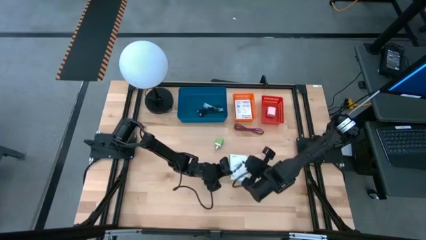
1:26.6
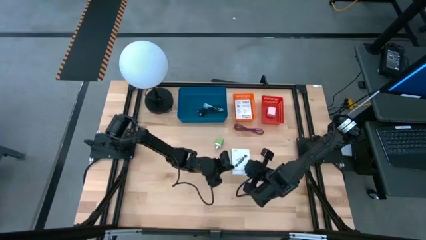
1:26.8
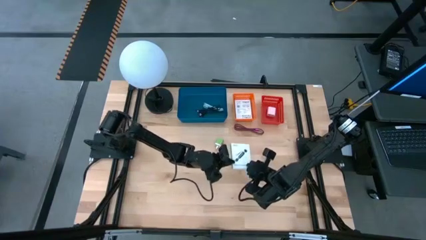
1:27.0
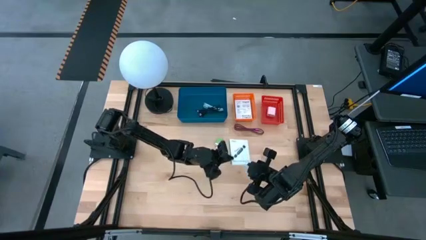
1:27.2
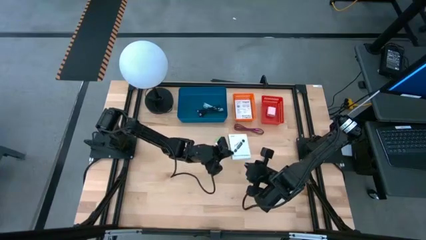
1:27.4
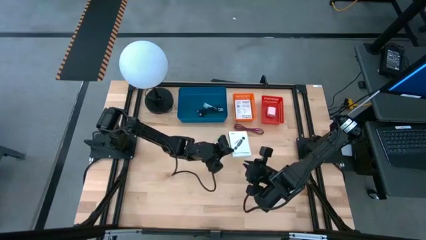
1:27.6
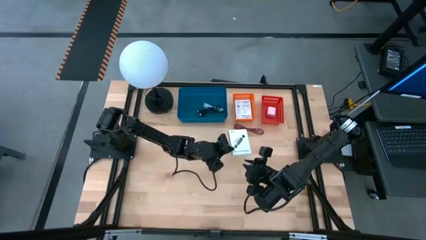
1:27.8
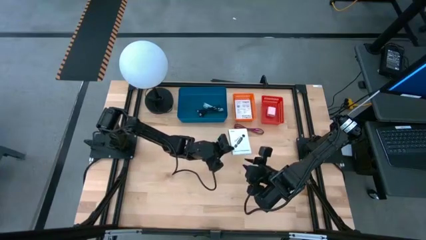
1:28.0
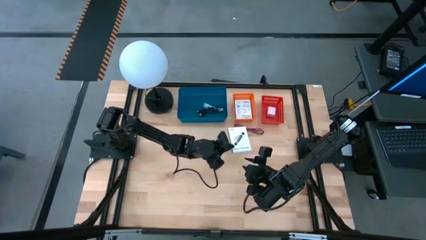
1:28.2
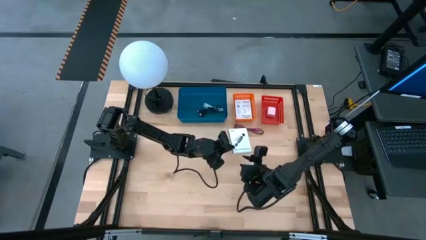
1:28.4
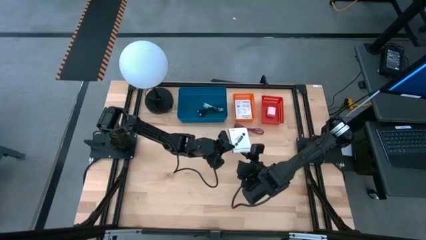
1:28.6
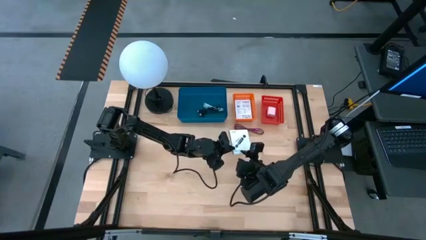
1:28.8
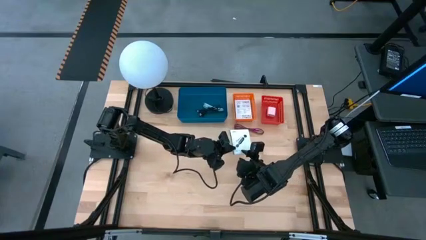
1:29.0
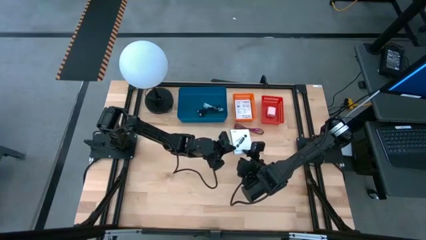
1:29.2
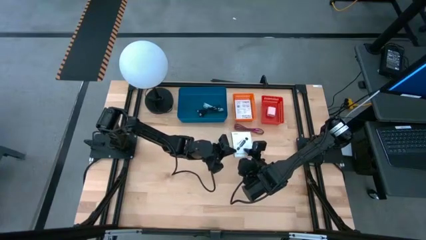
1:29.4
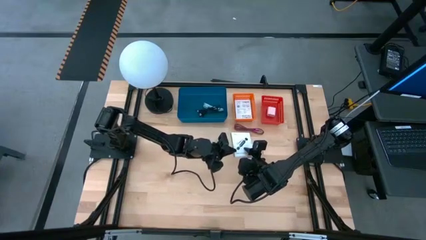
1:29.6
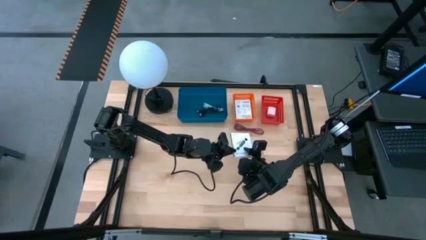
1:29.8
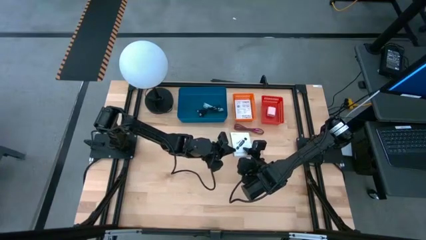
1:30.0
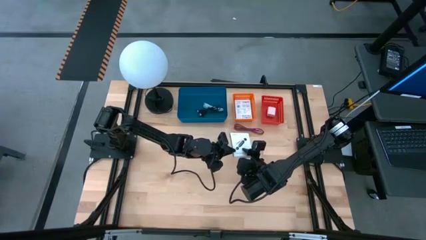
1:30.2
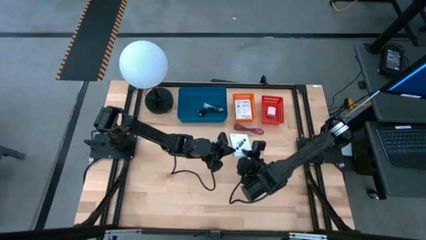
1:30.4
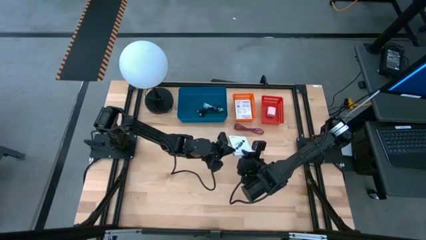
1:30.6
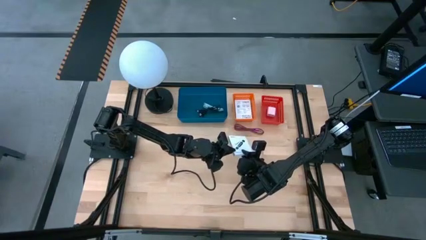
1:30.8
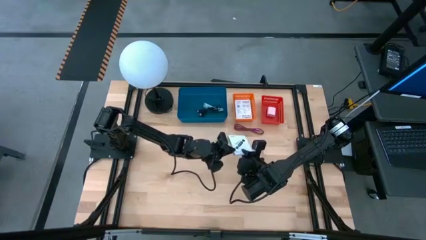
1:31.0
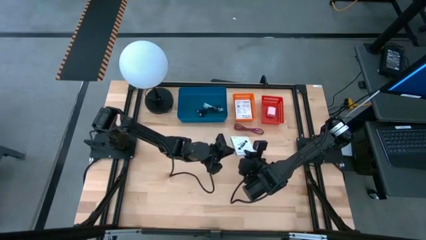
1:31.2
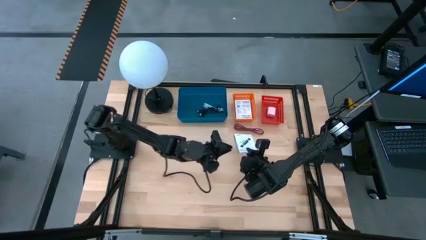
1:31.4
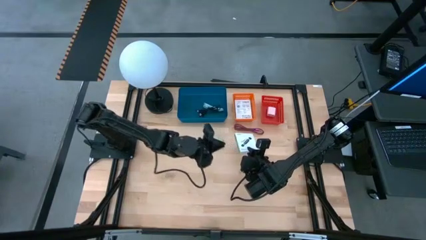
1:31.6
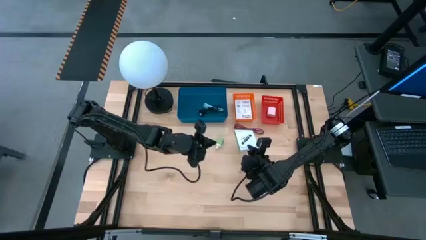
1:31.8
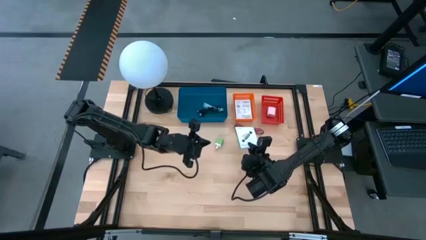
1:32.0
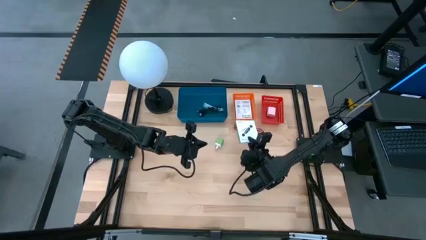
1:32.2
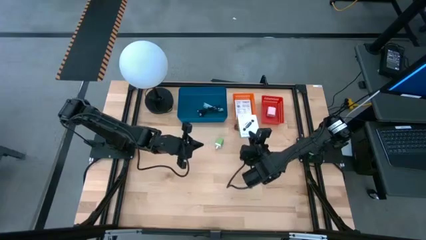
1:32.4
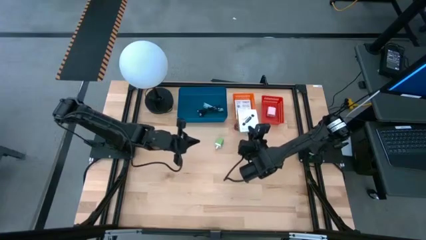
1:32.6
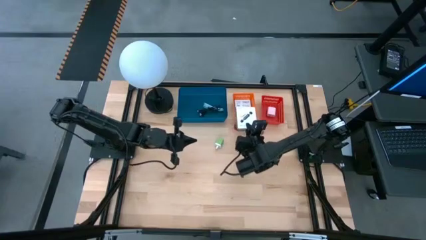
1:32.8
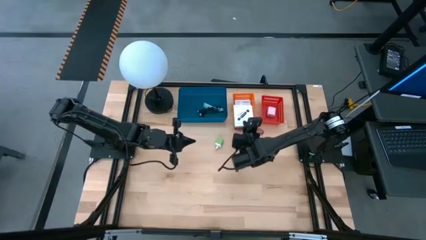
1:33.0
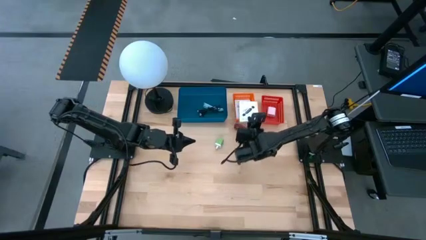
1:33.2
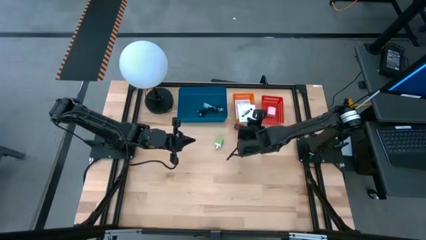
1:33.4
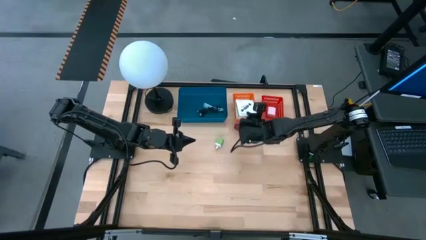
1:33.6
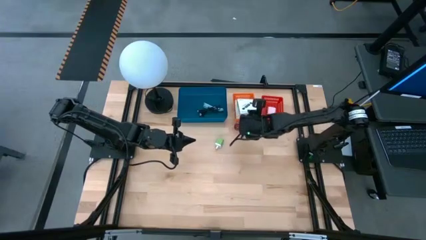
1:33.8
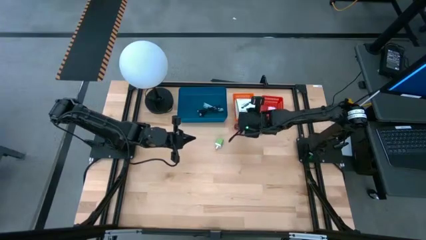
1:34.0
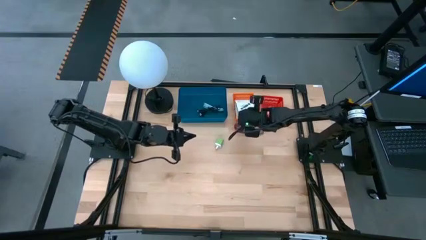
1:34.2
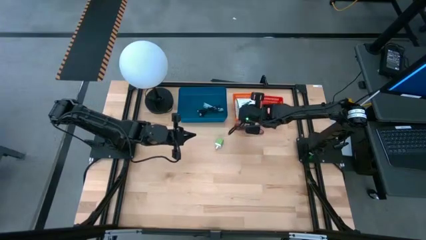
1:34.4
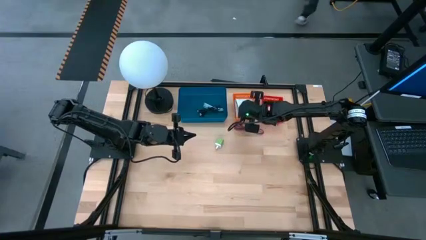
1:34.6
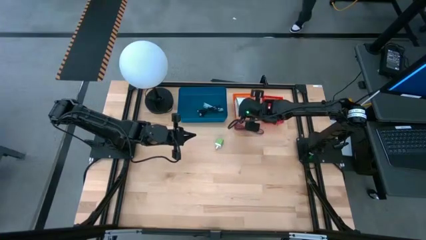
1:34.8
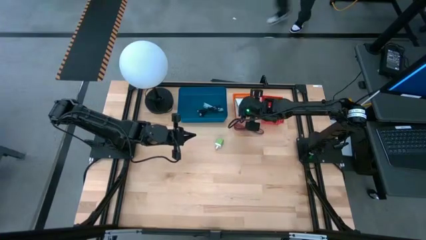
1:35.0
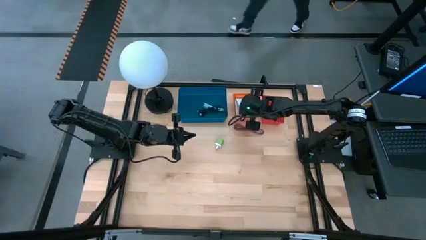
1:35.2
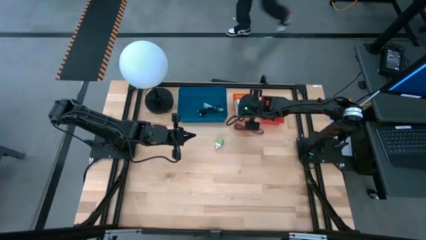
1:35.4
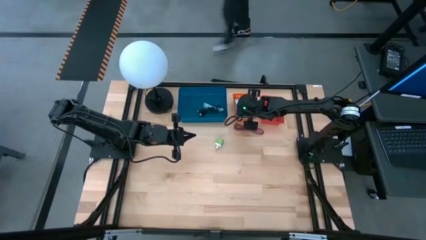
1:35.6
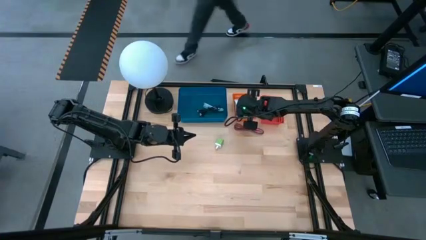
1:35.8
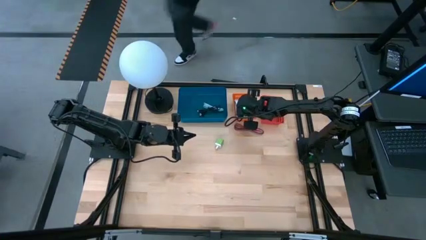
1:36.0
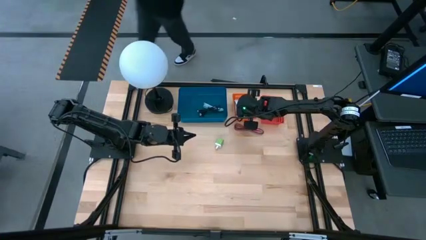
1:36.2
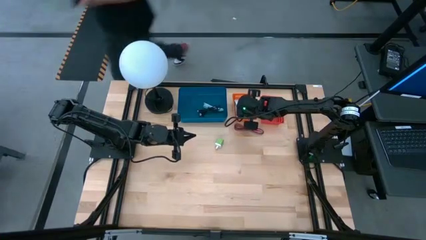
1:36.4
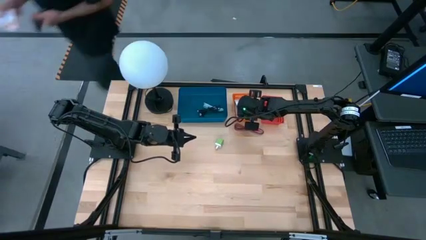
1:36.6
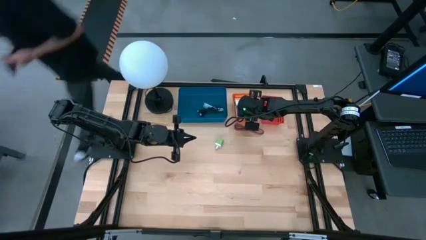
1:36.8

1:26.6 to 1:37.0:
Task: Pick and place items into bin
Put the white card reader box into the orange bin

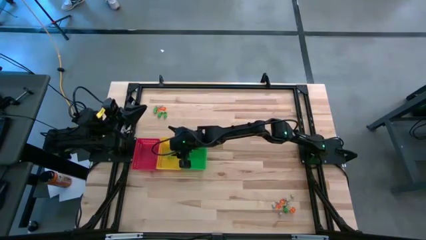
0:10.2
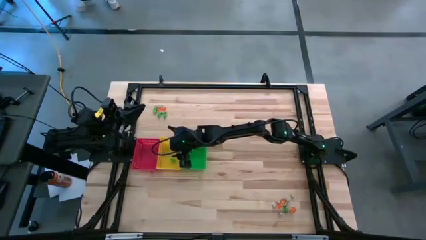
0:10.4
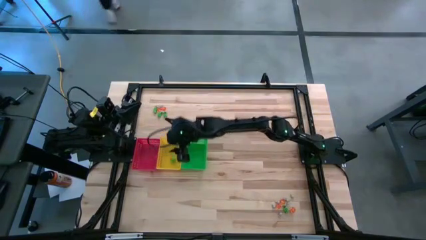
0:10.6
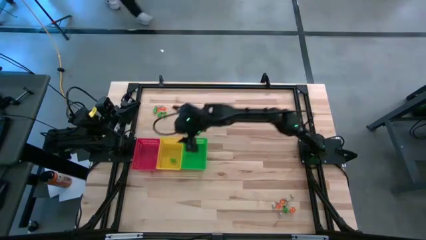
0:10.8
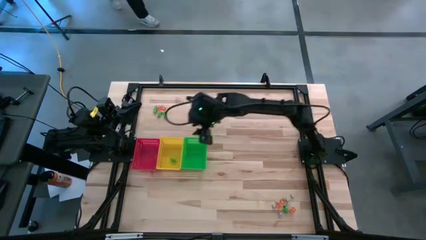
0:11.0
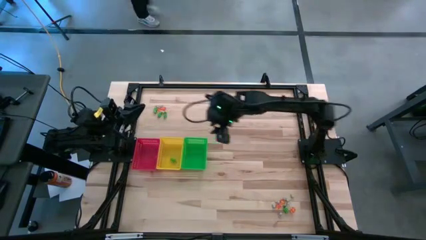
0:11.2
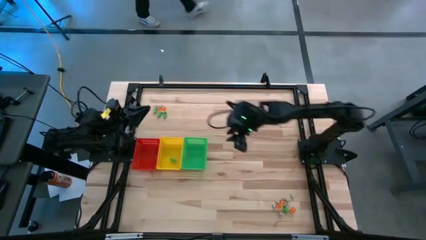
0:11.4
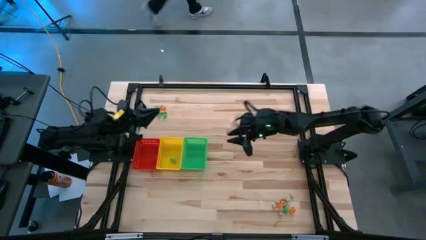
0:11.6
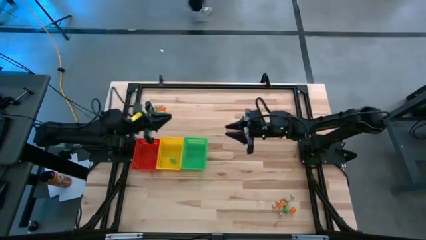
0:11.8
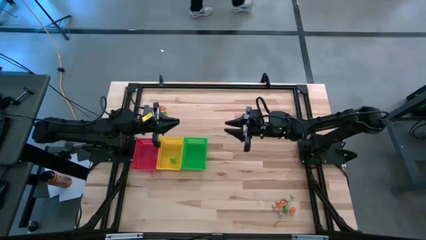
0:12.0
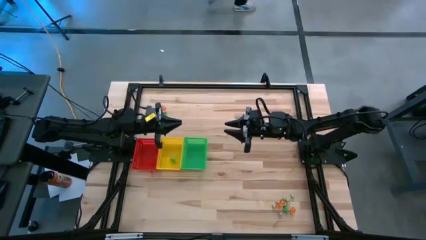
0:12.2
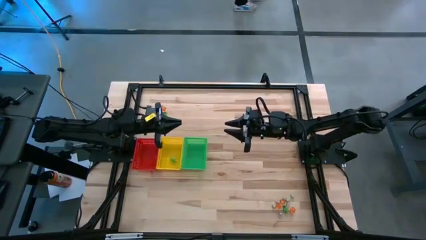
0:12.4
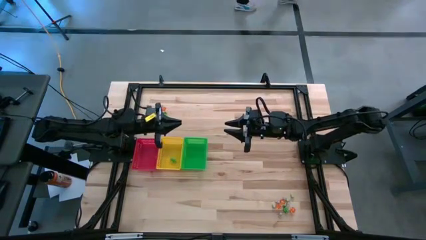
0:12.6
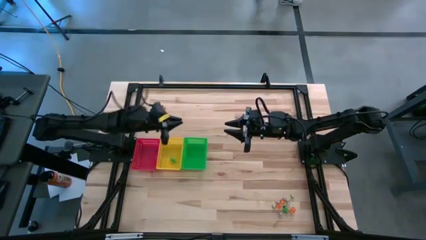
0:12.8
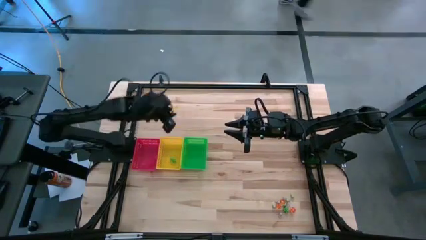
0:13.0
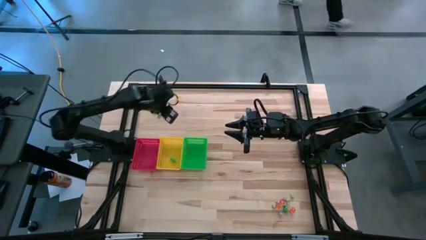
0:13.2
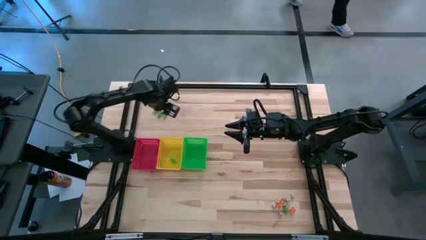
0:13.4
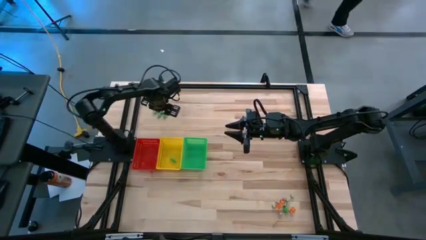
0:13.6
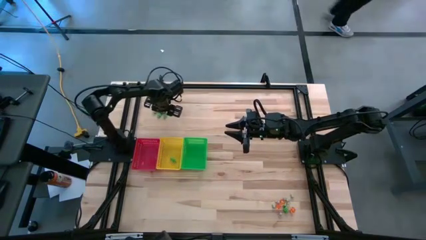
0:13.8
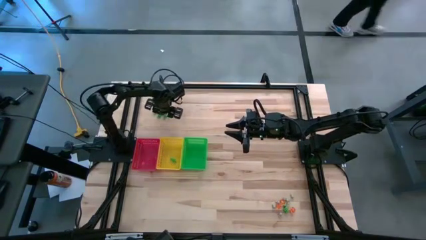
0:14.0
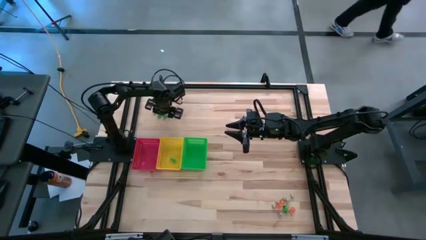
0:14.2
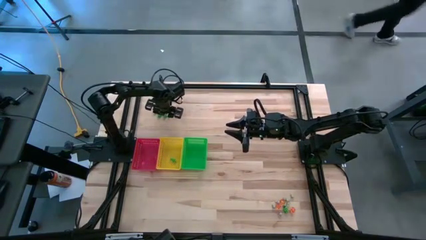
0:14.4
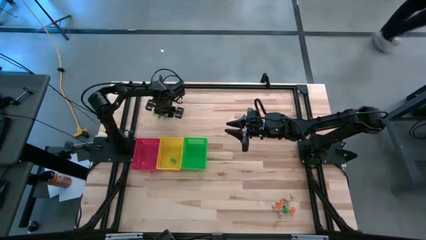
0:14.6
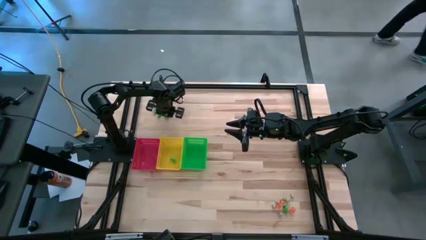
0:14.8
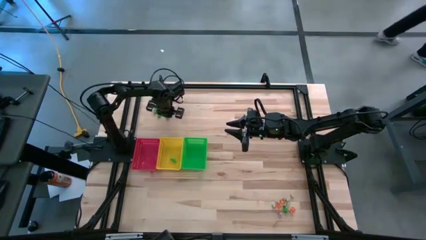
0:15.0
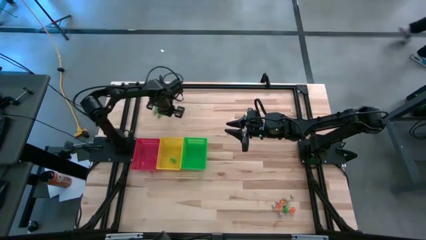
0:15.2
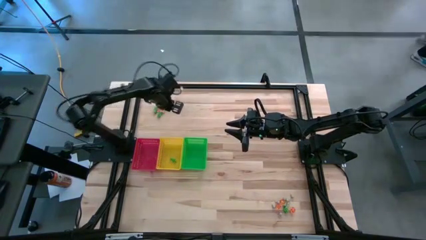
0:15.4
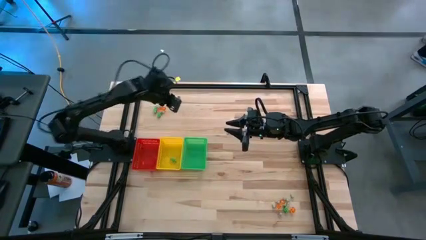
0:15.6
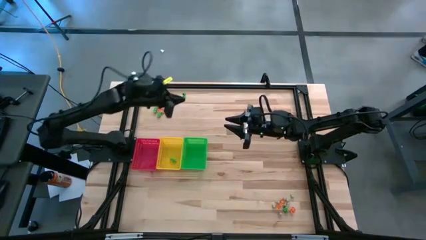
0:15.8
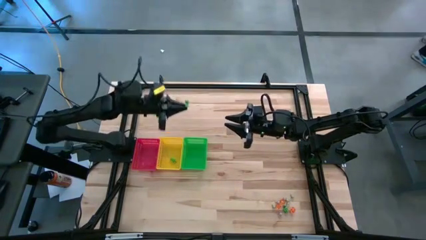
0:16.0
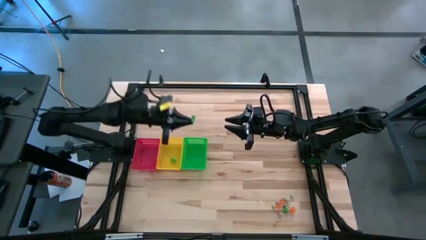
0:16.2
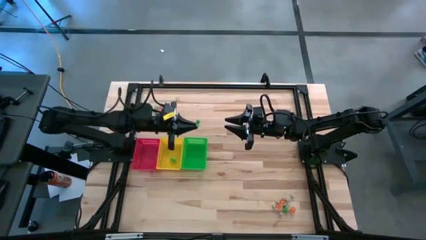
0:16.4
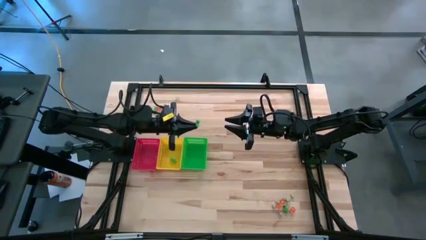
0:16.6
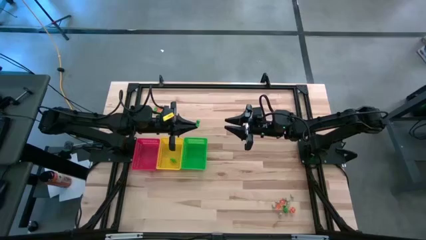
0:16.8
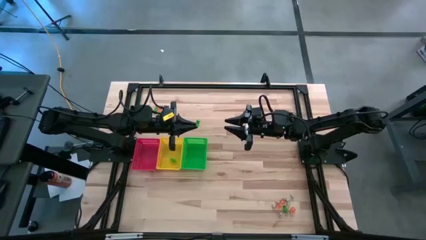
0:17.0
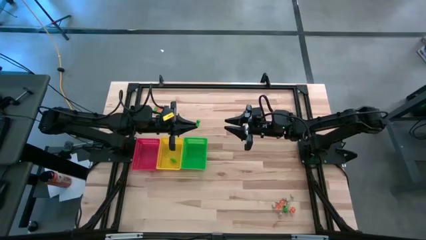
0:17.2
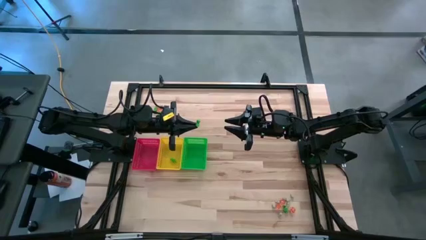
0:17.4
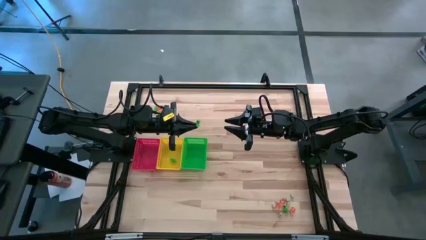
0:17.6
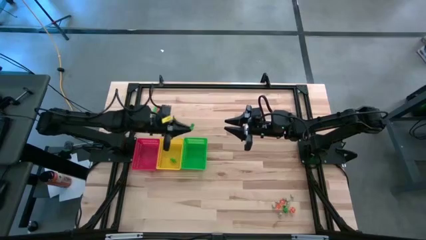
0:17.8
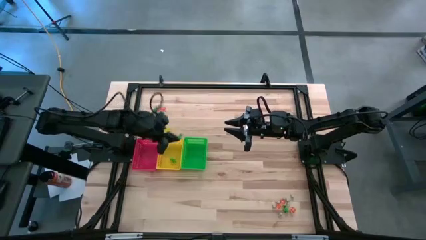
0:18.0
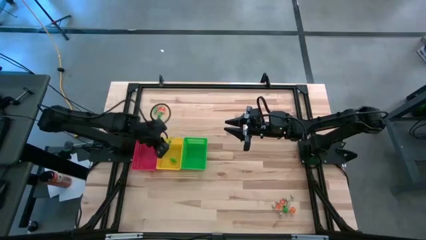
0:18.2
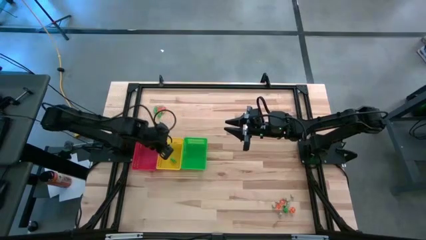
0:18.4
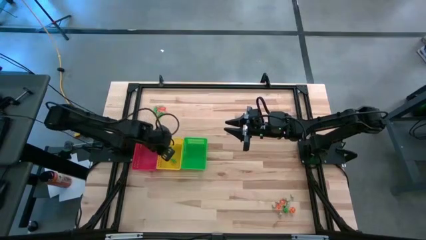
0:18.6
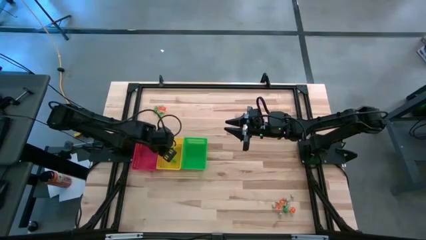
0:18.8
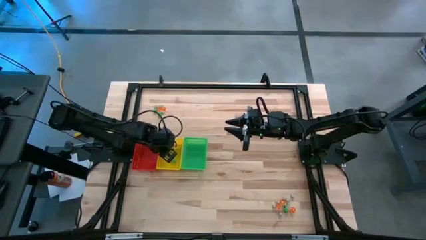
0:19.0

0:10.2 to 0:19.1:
Task: Sort Halloween decoration
Put the green skeleton toy into the yellow bin
